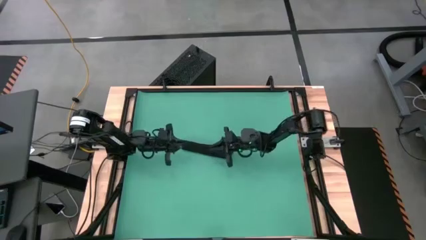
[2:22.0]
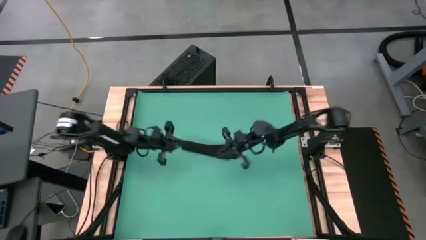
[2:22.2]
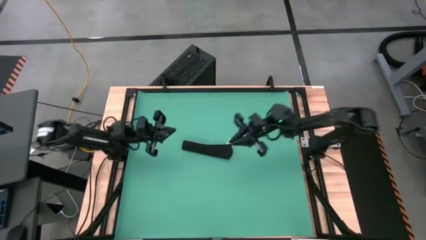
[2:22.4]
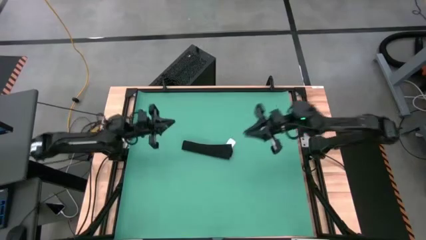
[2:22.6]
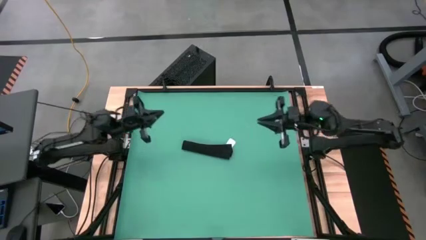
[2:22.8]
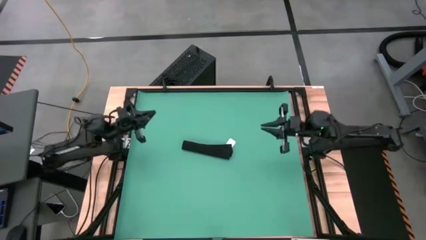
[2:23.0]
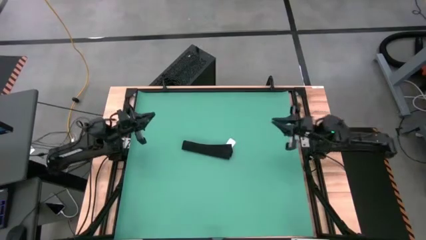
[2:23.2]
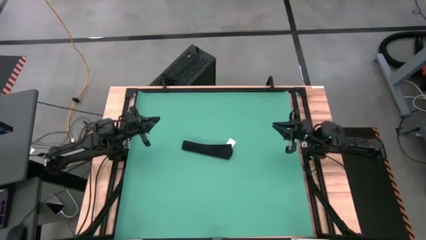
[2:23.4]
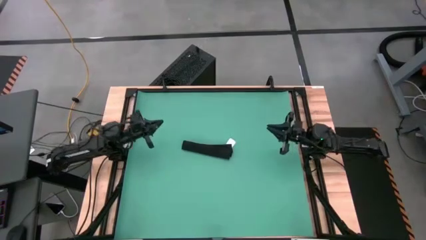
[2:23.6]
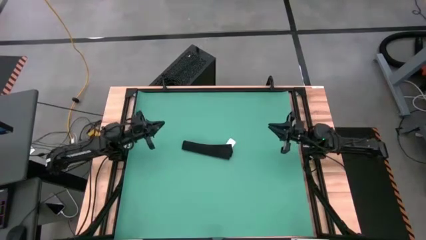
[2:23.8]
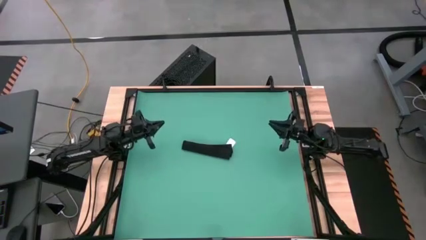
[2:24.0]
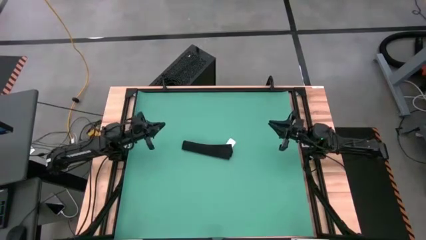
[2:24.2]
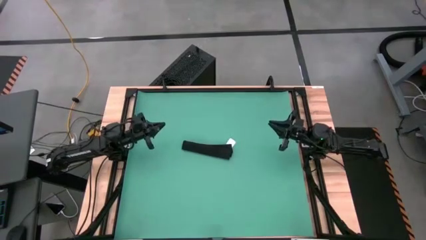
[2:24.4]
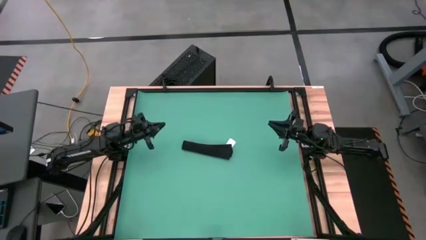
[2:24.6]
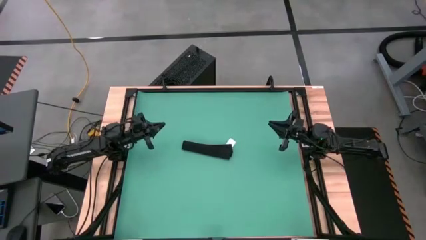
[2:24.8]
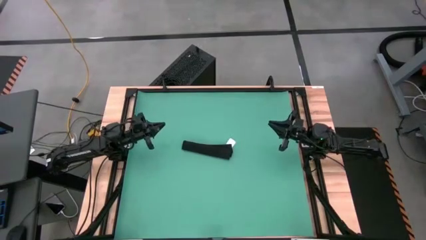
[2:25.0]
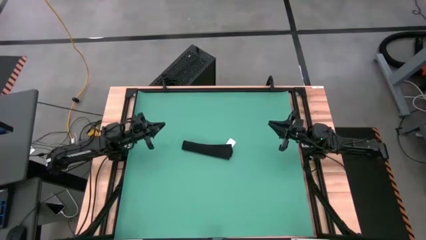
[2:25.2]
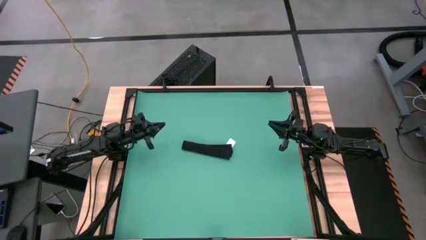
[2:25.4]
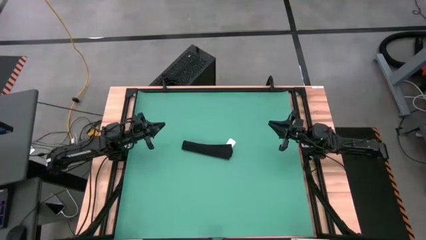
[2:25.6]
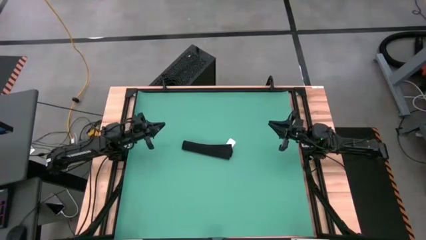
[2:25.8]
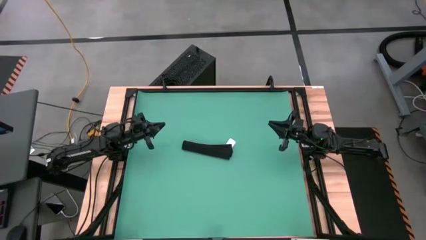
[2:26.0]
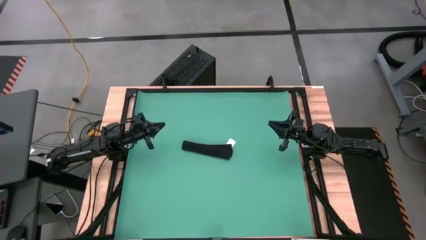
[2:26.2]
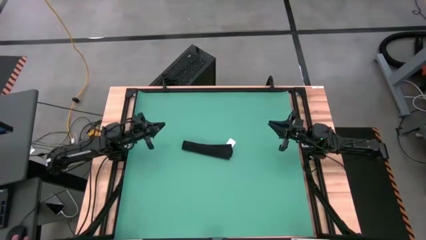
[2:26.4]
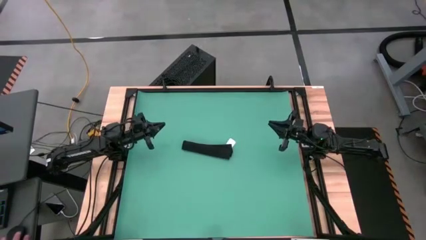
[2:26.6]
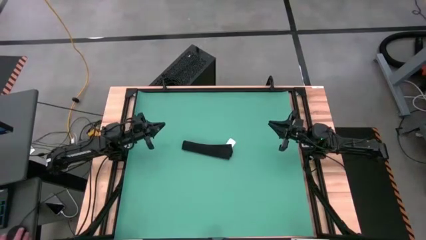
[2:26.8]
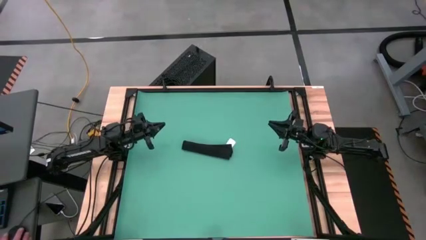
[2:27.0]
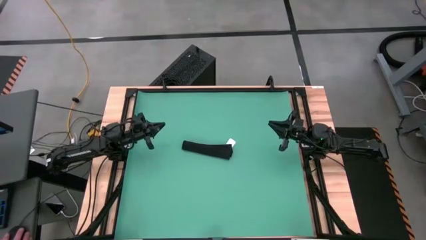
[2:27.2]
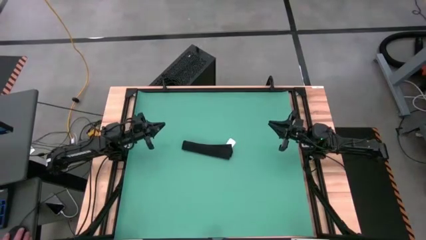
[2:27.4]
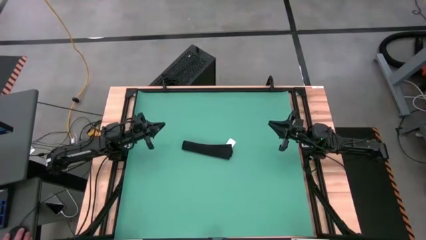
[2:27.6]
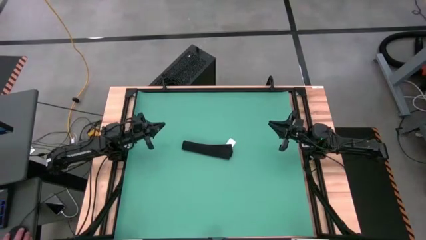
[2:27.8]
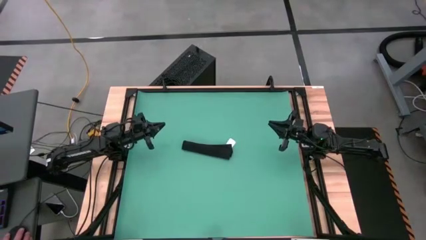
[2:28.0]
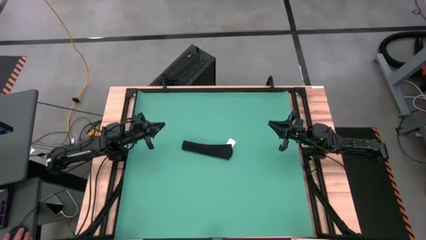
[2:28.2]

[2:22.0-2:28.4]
Task: Roll towel
Return to Home Position

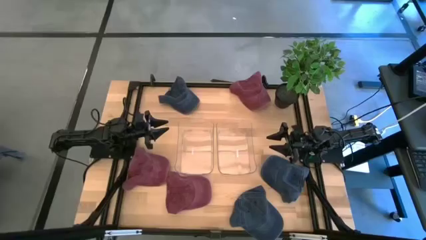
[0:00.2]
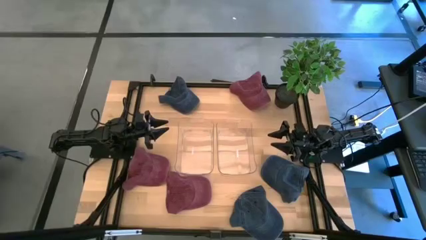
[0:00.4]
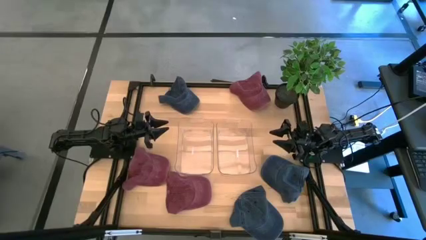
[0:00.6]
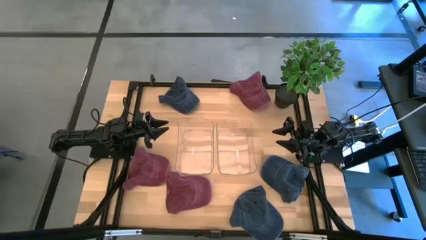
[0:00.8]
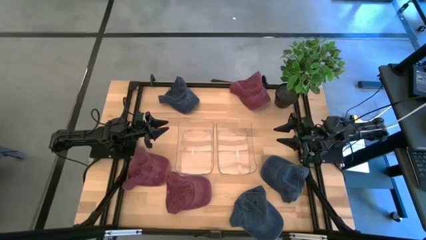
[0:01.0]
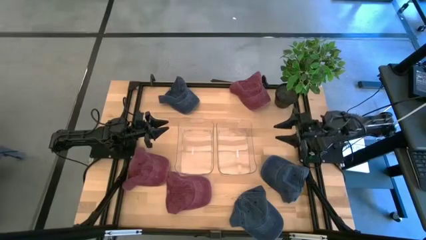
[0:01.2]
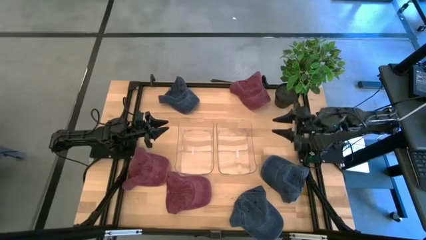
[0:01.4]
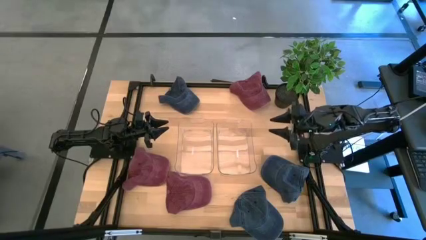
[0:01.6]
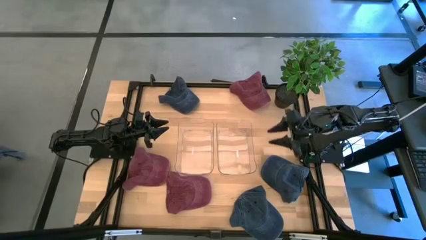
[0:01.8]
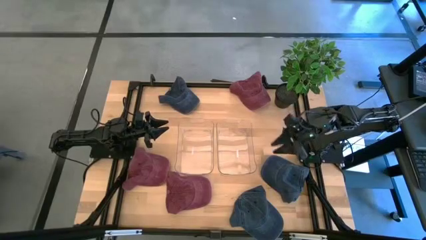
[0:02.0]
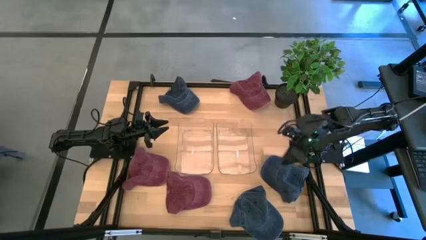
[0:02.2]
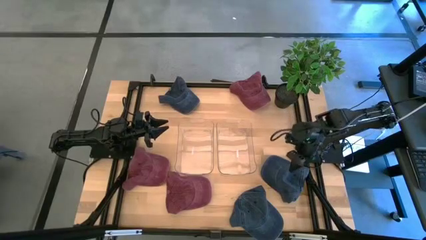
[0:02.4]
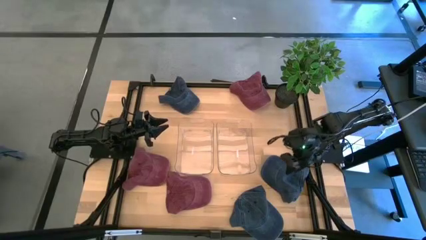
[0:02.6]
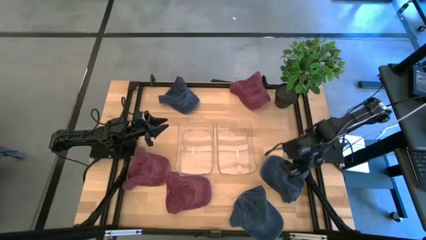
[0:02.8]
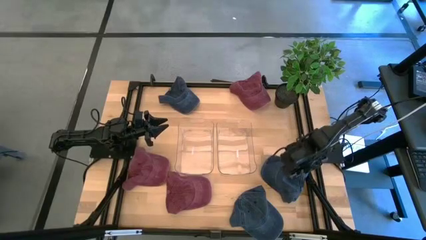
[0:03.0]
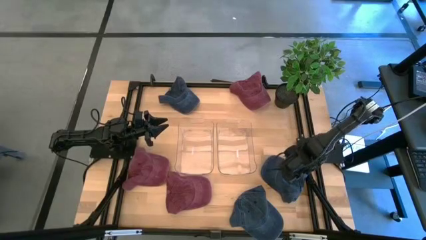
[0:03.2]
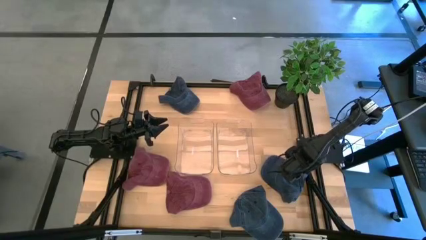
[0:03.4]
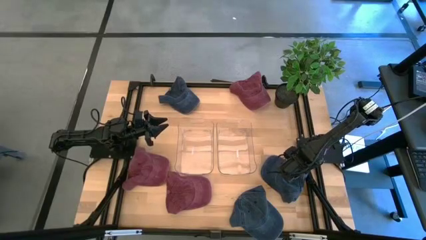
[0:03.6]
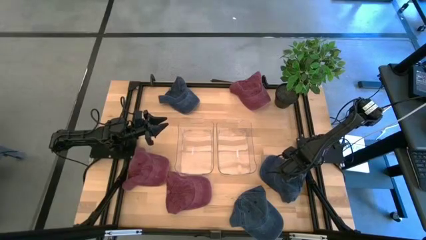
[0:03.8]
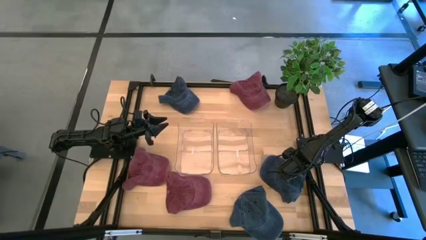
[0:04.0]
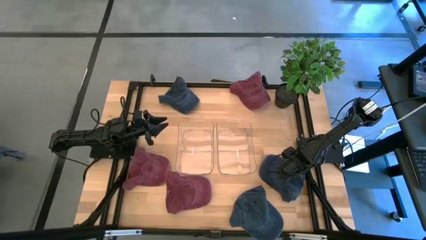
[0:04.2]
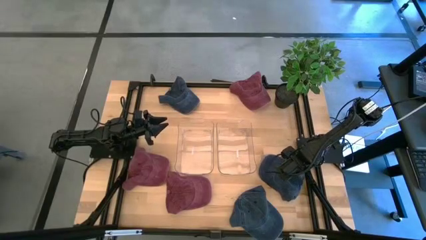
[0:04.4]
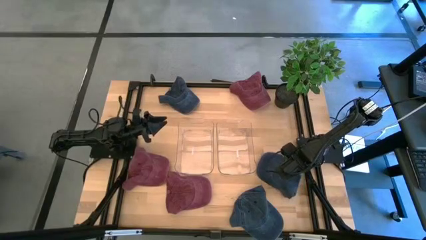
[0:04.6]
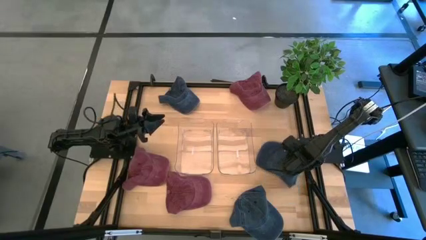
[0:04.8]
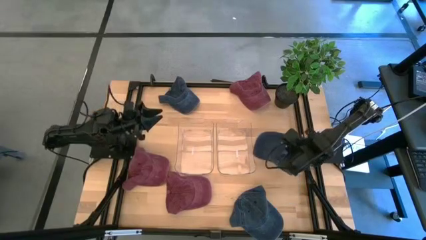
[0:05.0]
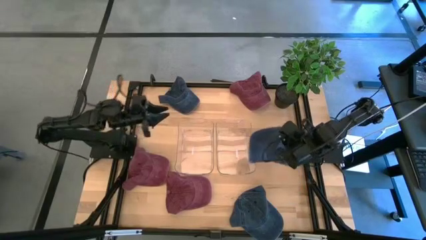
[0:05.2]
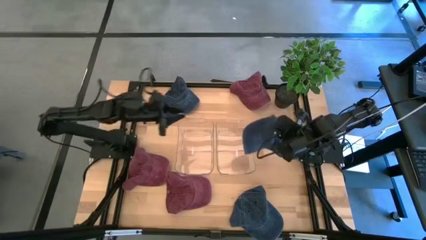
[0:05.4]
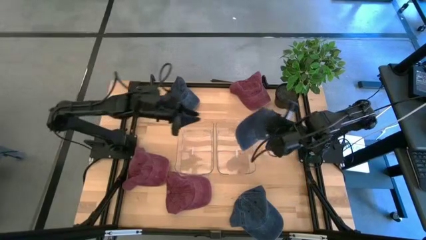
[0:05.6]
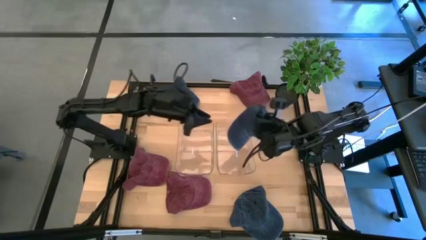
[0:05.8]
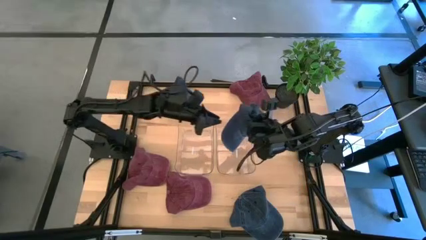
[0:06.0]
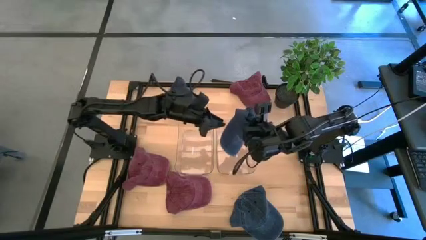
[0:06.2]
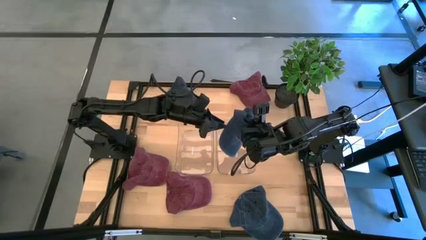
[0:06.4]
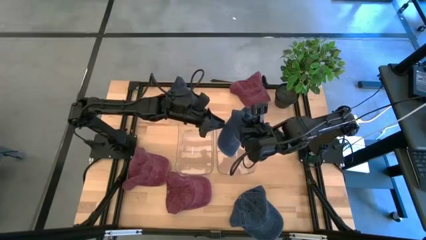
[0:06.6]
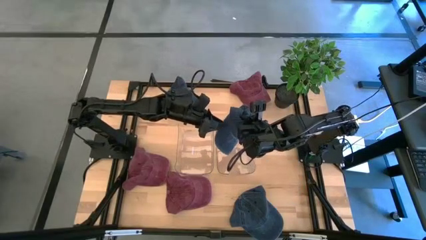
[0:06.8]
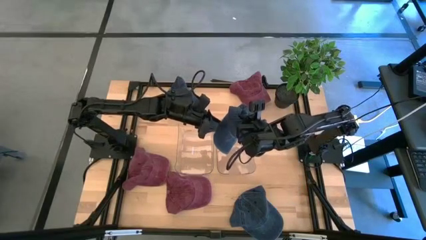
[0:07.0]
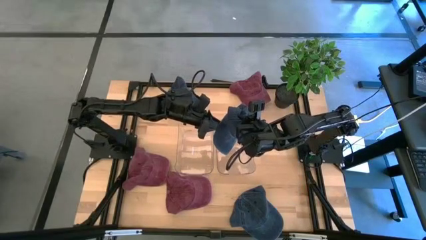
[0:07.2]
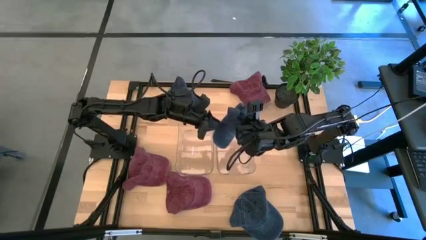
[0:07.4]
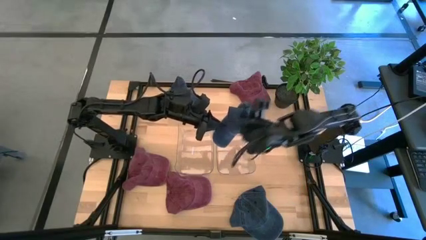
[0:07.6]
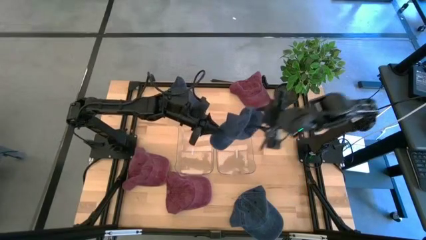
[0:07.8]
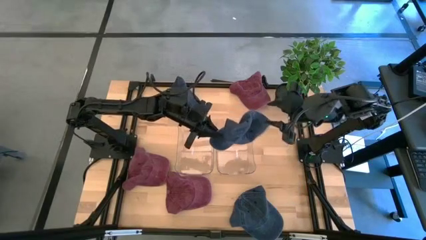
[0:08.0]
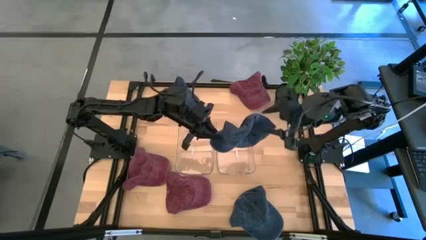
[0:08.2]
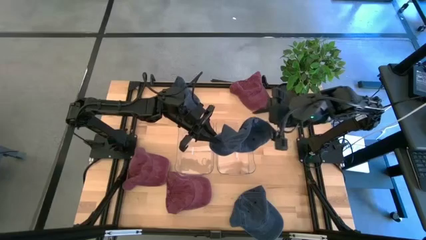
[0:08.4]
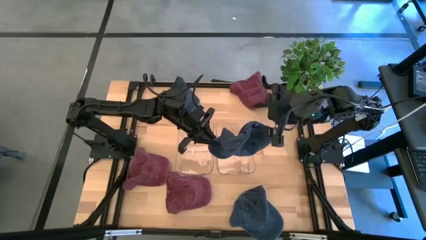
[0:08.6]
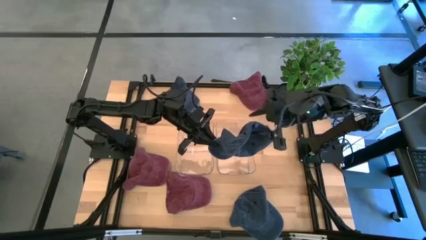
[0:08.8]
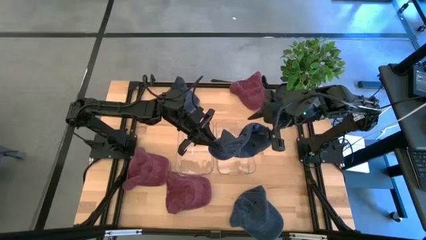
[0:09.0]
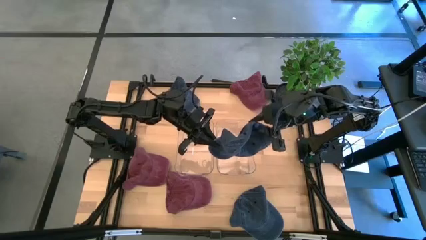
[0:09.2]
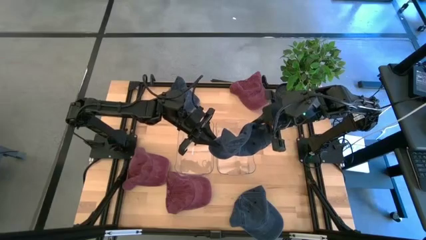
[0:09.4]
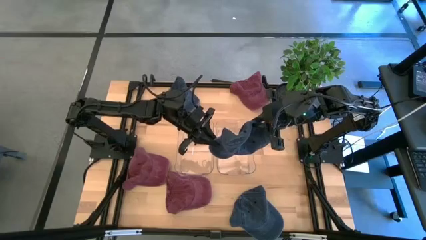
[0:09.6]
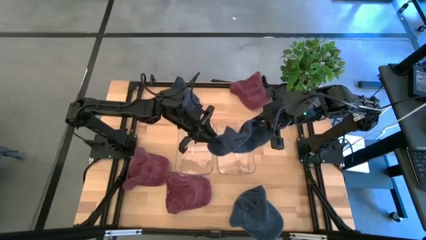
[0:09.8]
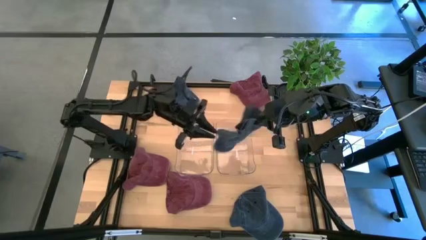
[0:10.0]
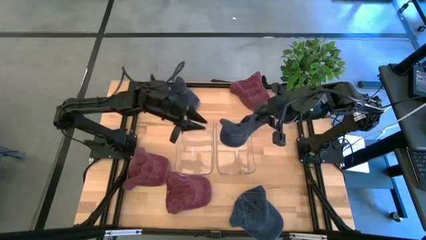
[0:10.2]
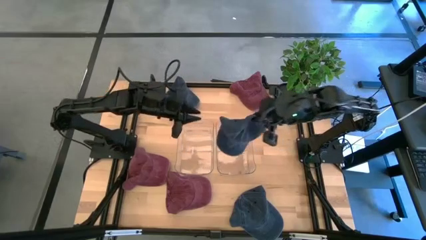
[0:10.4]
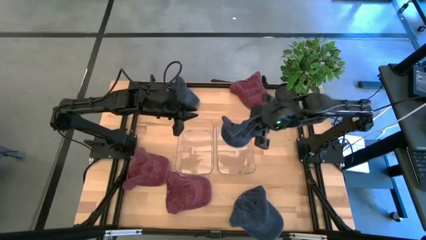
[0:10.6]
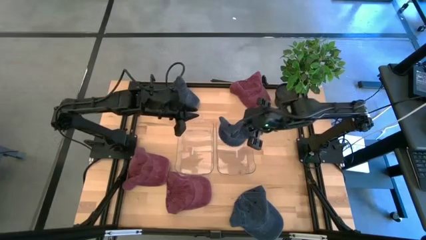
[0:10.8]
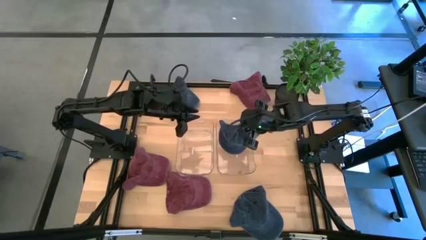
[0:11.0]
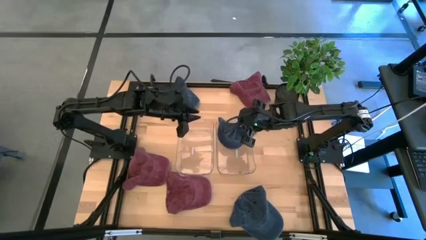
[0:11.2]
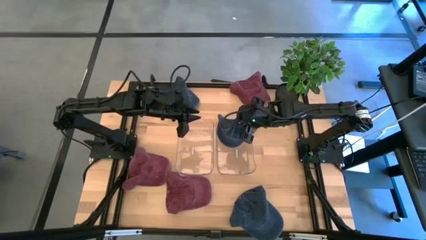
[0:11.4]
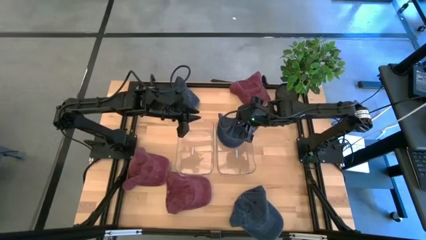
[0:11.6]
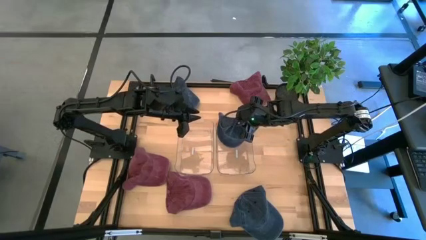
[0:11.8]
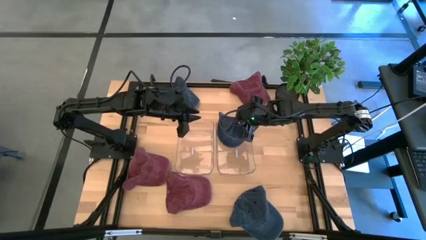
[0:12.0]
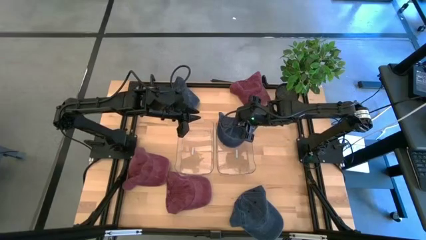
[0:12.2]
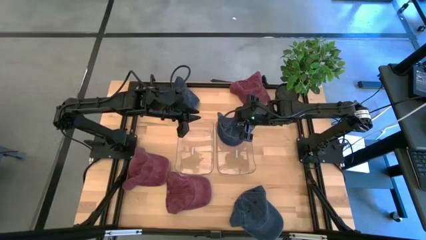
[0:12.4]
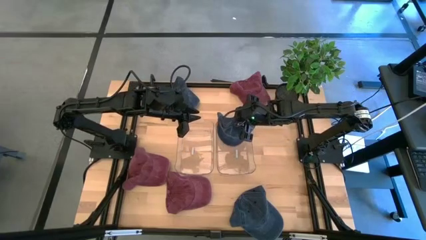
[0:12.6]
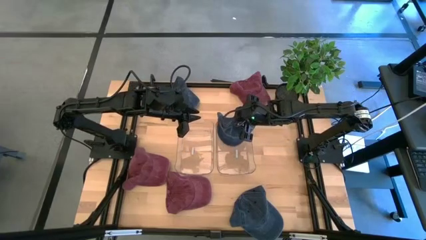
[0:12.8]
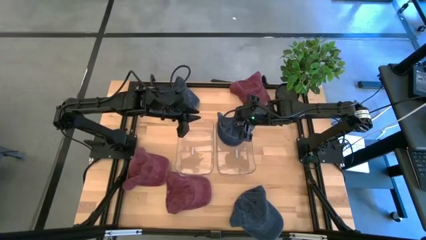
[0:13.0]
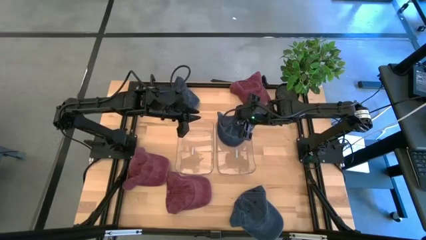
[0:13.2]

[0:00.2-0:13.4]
Task: Pick & Place hat
Put the middle right blue cap into the right transparent bin
